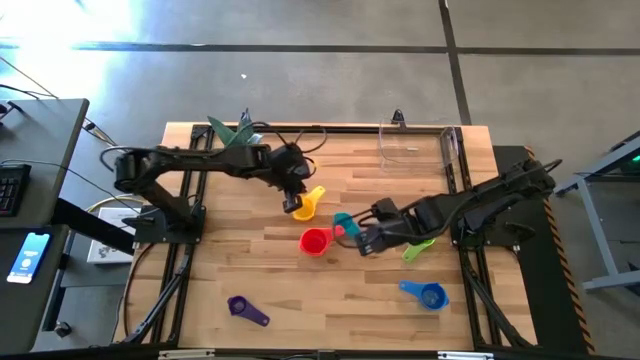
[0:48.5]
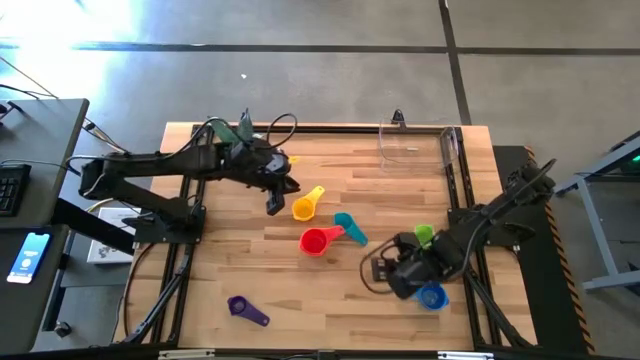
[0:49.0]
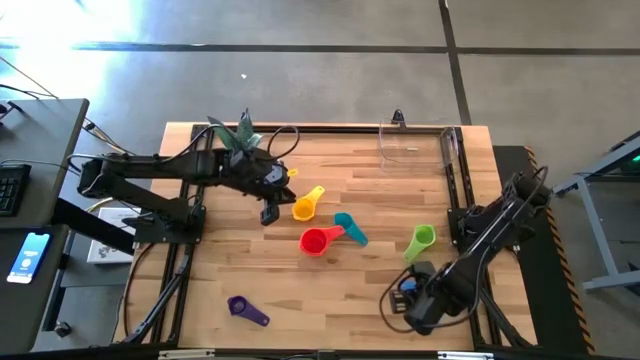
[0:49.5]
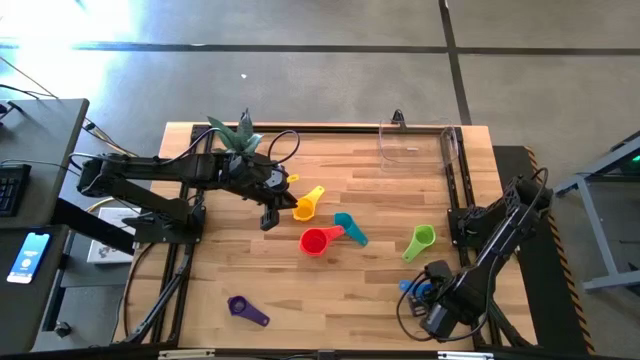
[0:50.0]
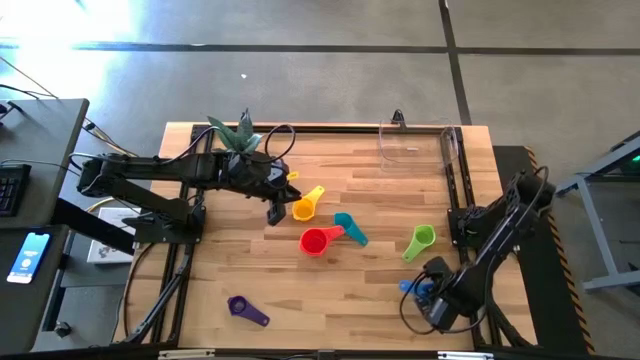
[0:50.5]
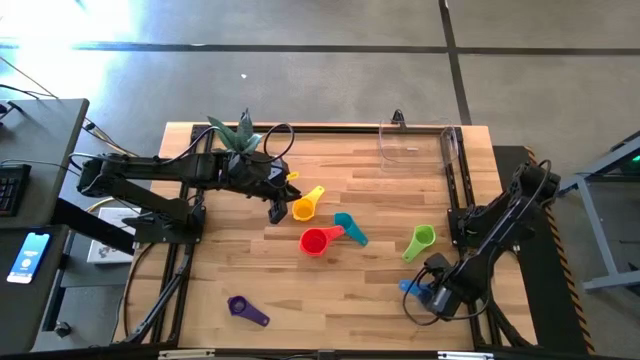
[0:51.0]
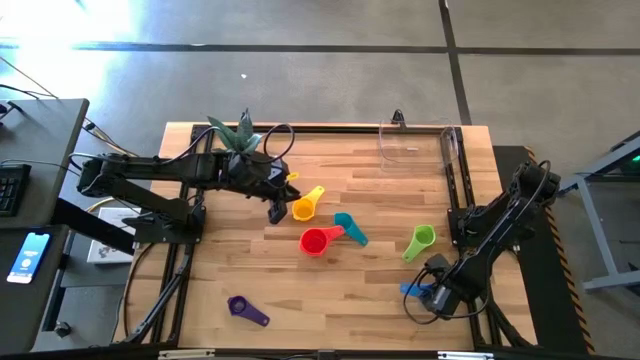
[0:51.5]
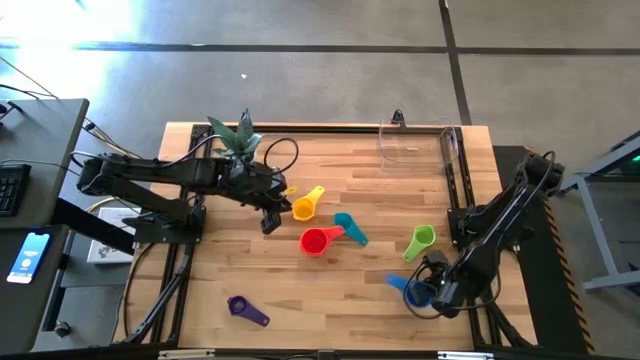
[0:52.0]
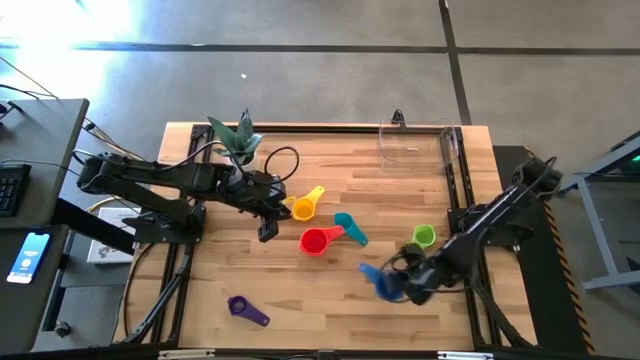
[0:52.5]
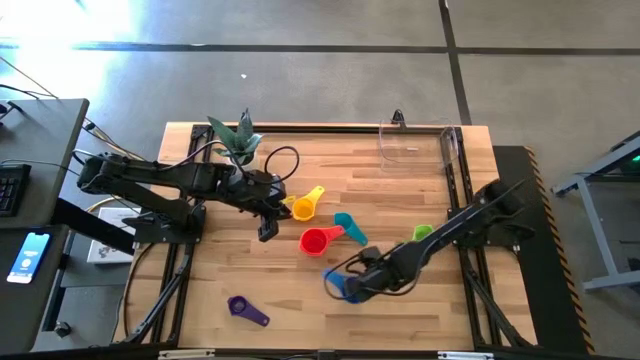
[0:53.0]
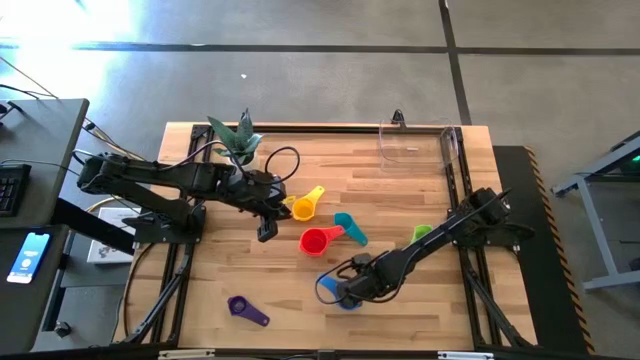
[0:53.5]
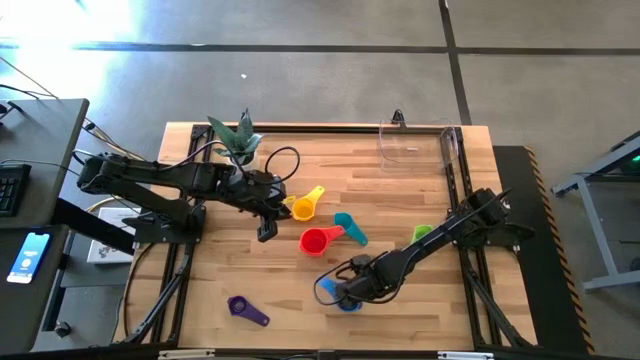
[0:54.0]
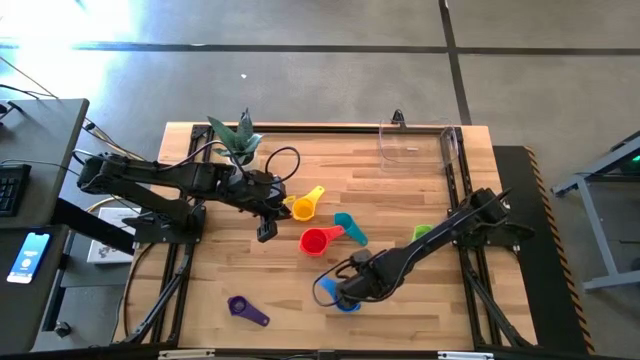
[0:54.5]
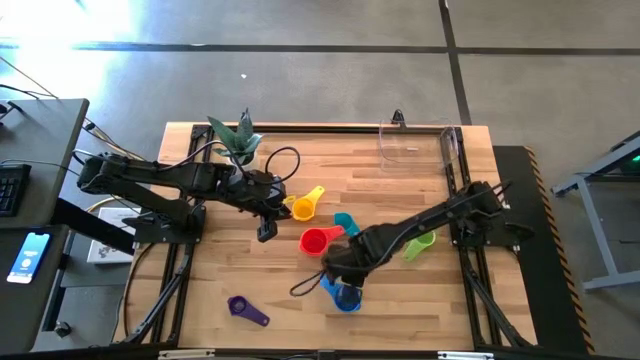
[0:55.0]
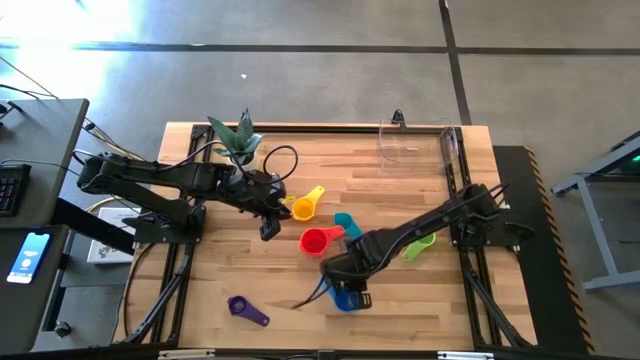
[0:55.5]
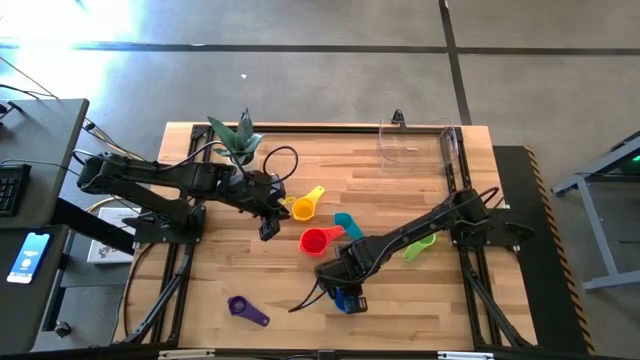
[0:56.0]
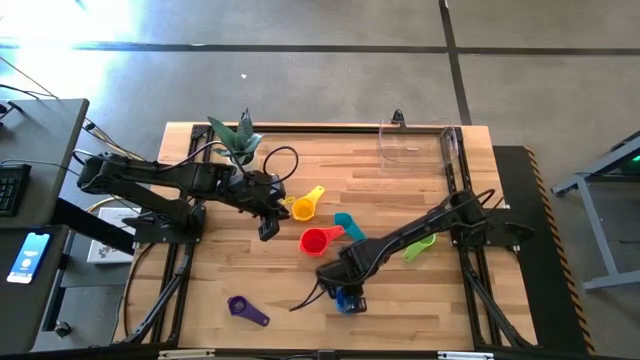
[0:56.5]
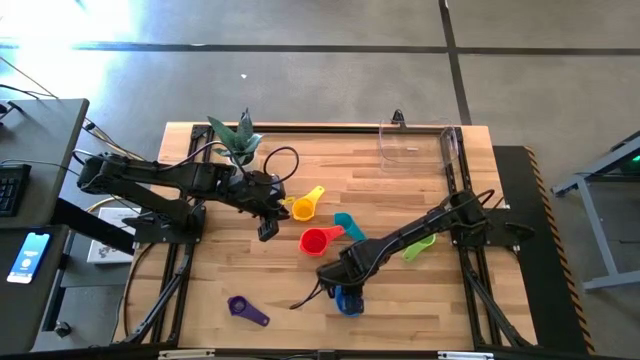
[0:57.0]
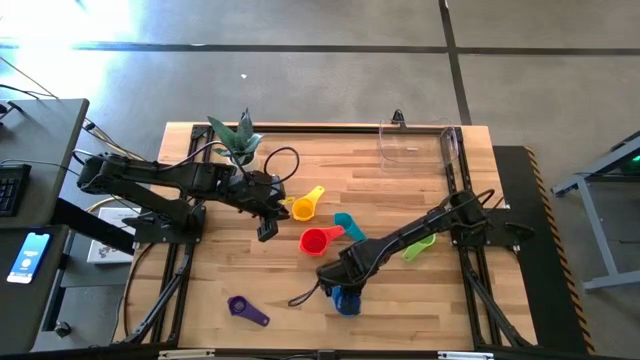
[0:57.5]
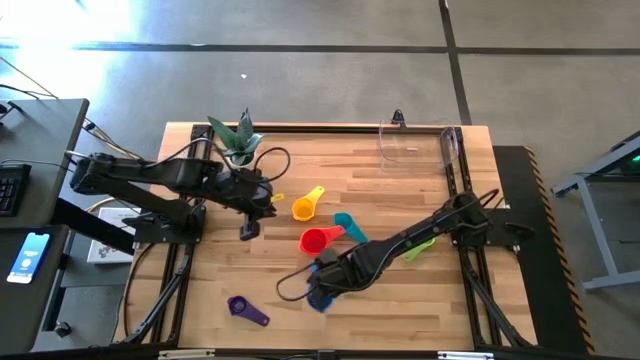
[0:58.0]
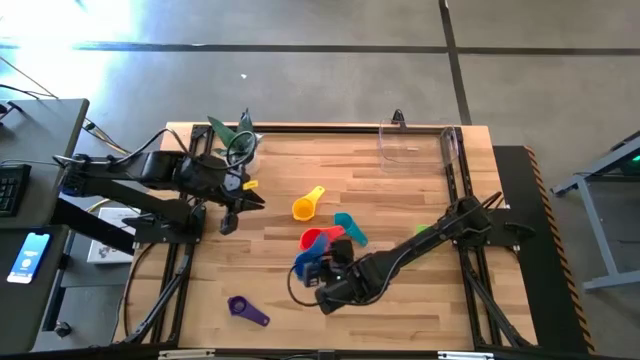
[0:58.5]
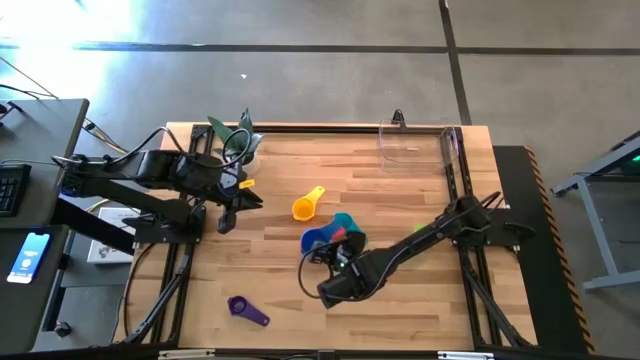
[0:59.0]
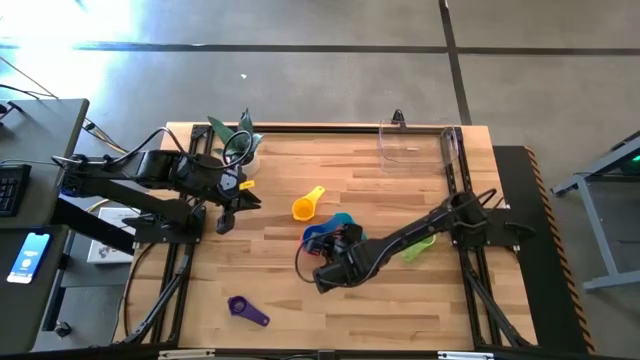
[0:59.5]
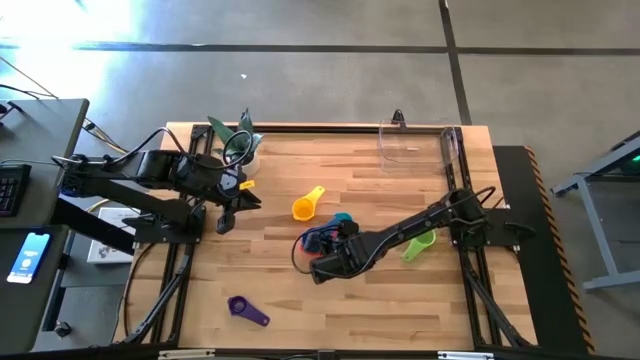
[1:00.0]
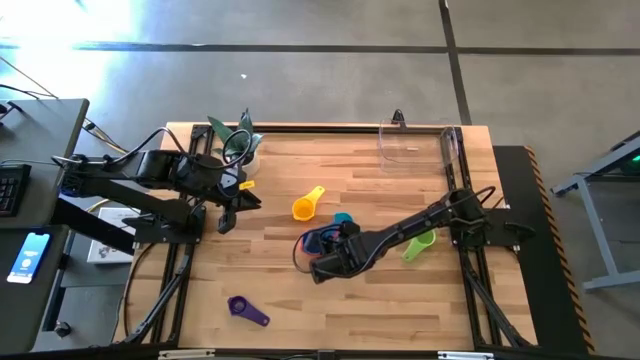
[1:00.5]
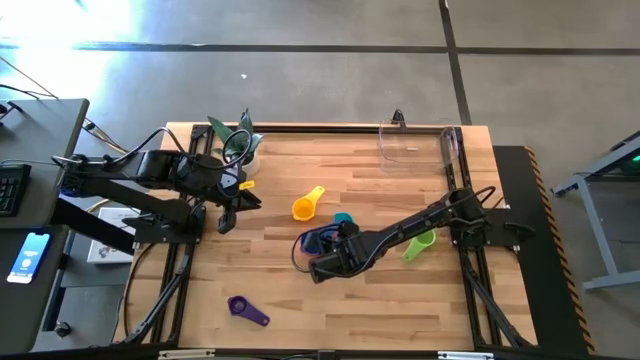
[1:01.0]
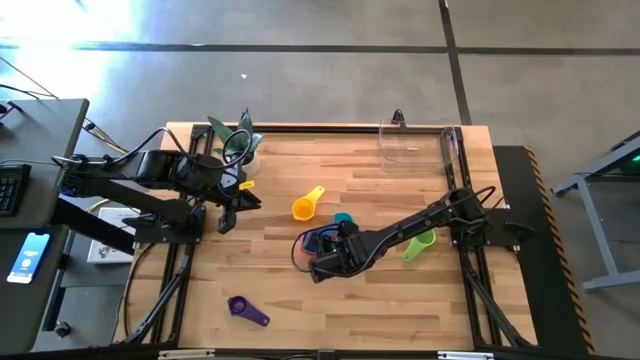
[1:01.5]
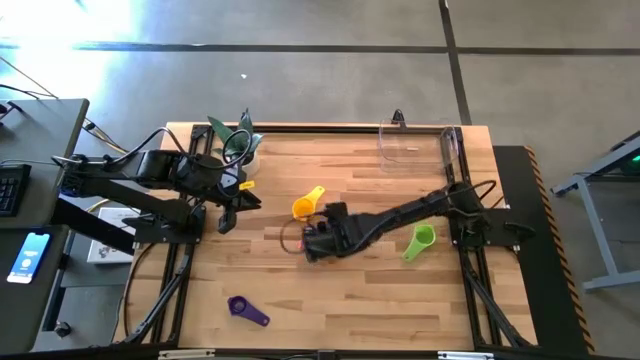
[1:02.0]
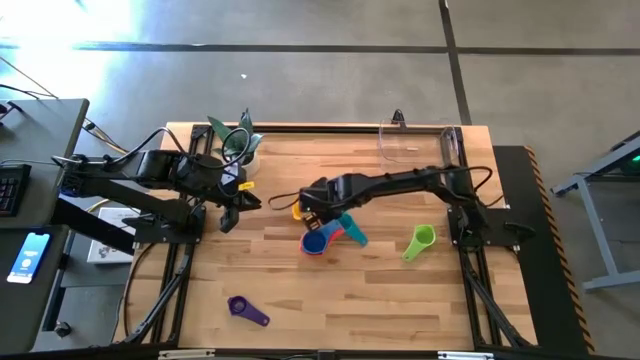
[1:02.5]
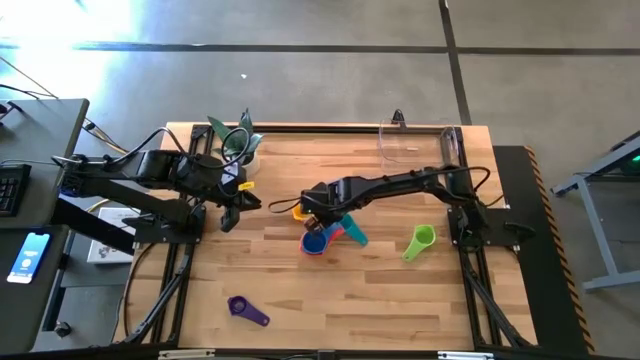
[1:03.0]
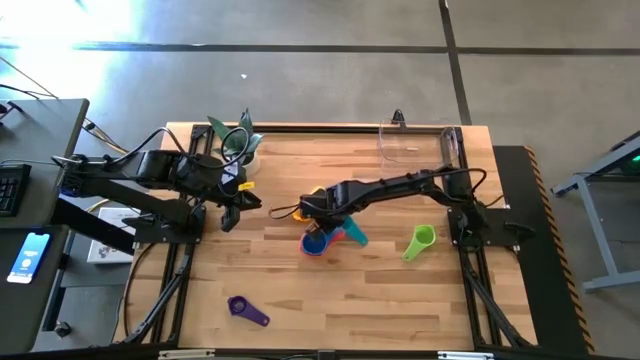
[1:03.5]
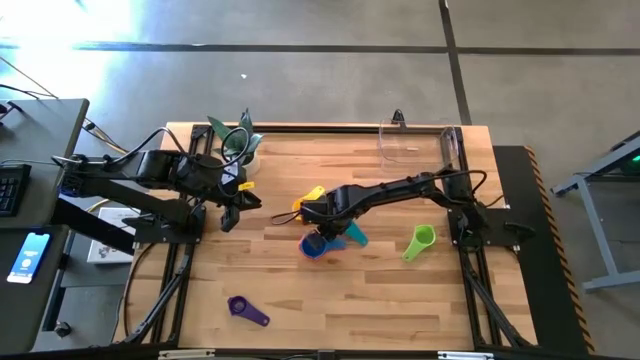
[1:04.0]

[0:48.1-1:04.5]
Task: Nest measuring cups in basket
Stack the blue measuring cup on top of the red measuring cup

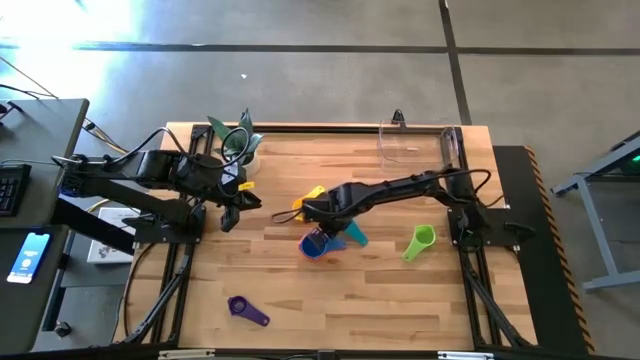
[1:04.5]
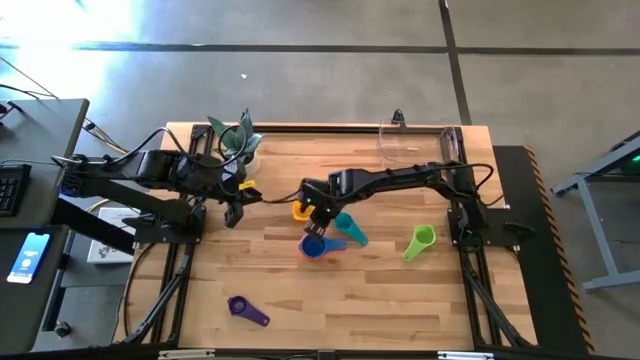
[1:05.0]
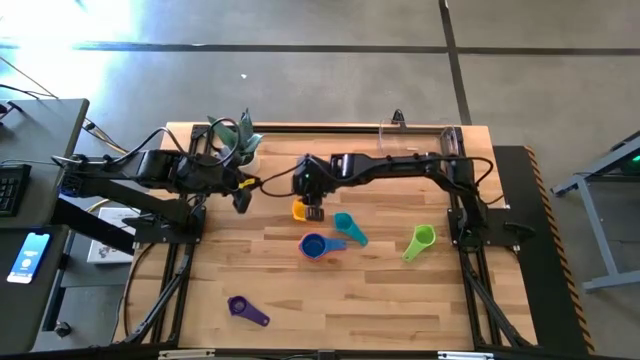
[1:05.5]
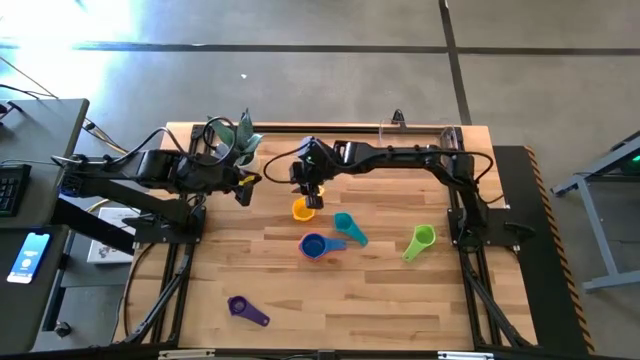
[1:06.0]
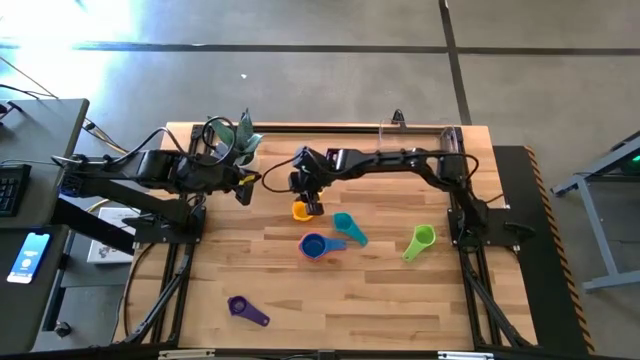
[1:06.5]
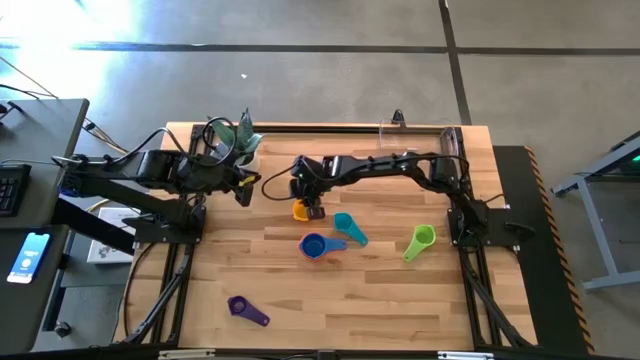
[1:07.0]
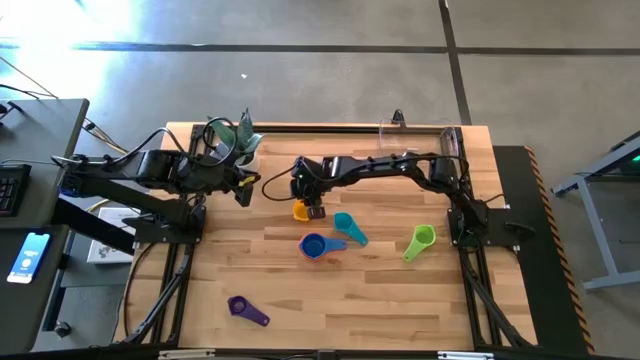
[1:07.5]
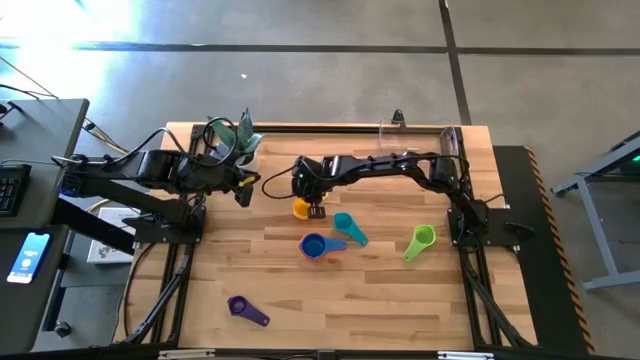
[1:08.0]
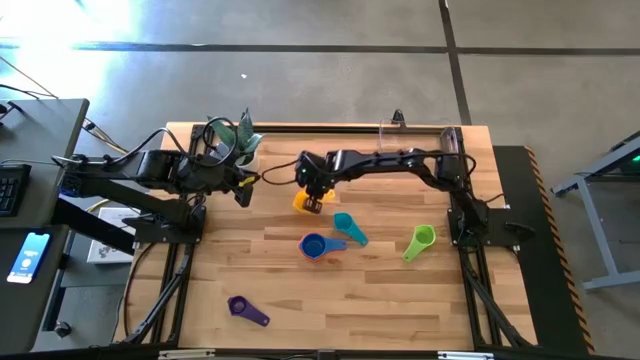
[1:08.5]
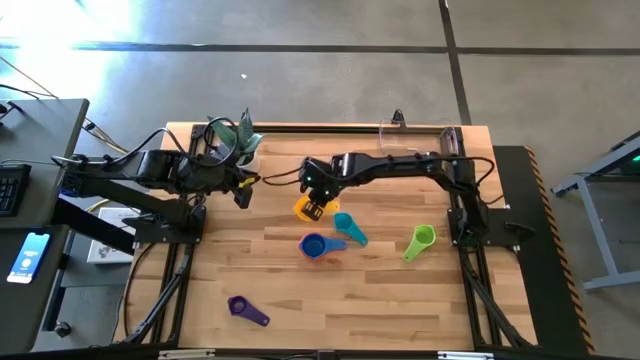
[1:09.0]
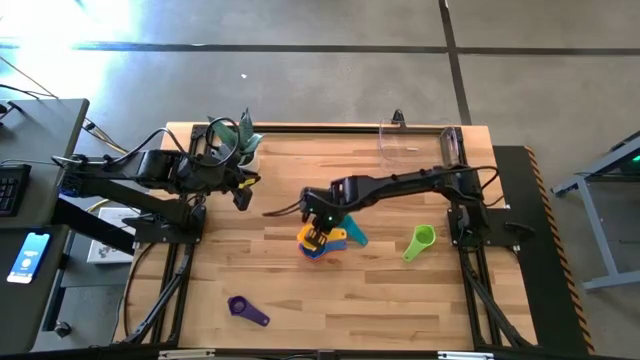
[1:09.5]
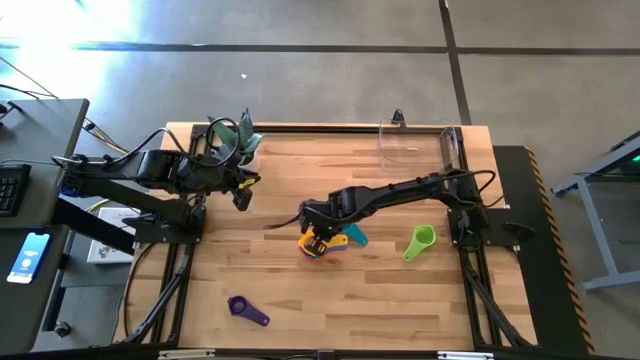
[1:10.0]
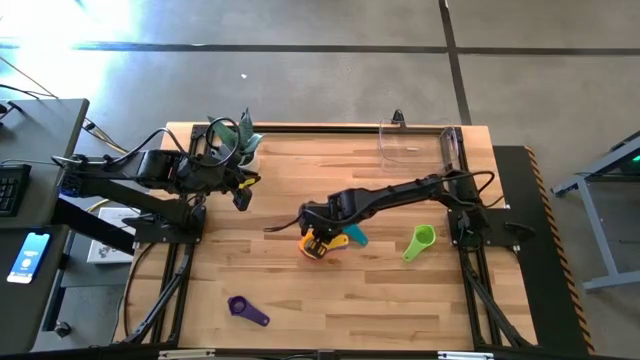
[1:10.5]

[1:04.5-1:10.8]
Stack the yellow measuring cup on top of the blue measuring cup
